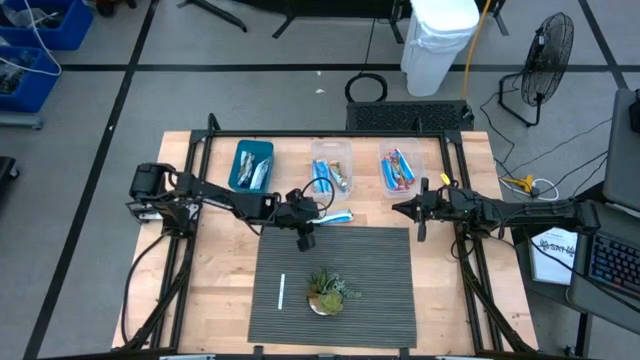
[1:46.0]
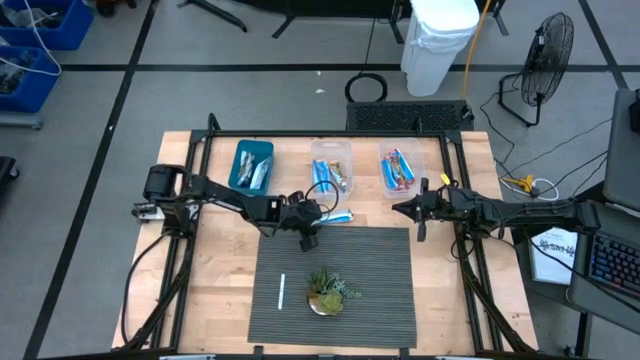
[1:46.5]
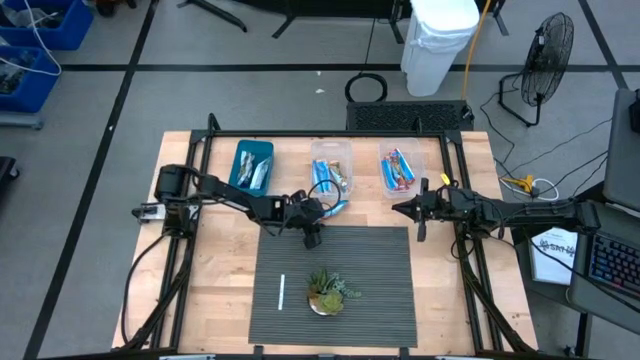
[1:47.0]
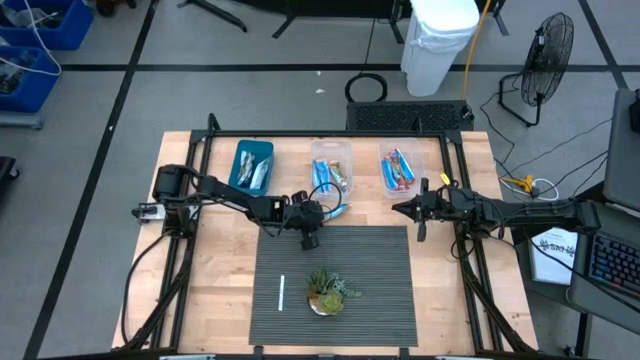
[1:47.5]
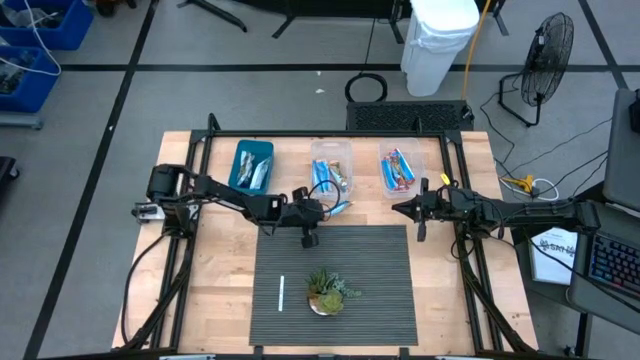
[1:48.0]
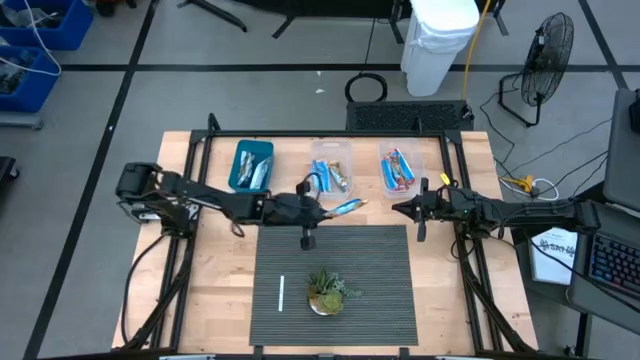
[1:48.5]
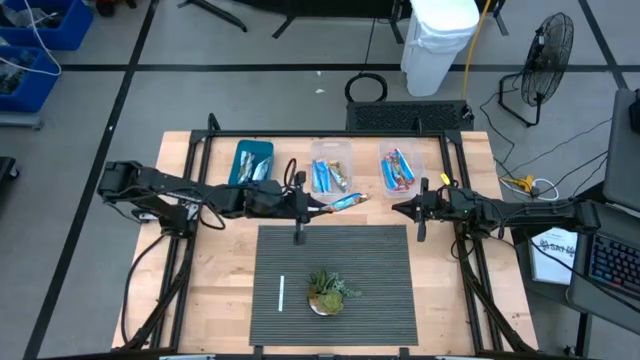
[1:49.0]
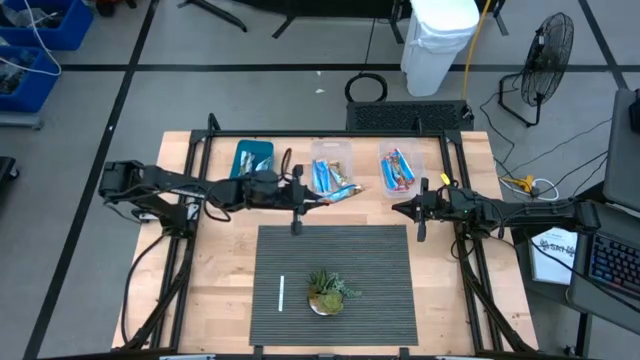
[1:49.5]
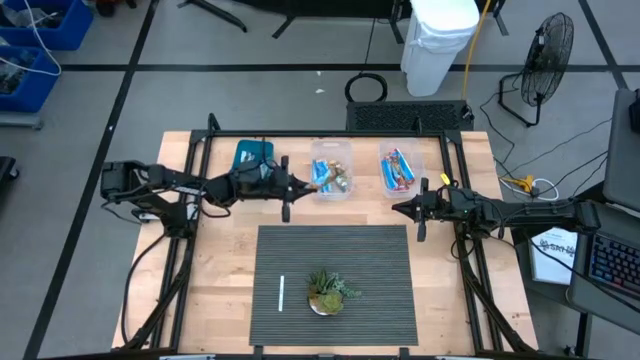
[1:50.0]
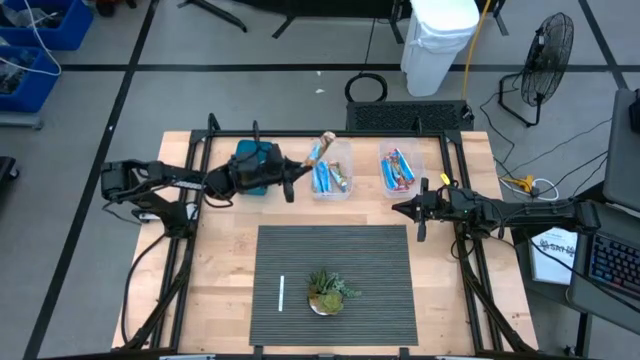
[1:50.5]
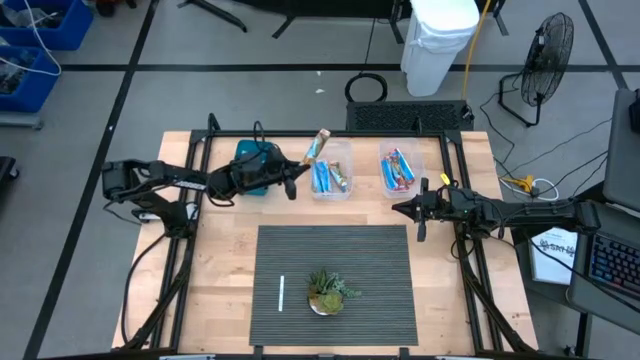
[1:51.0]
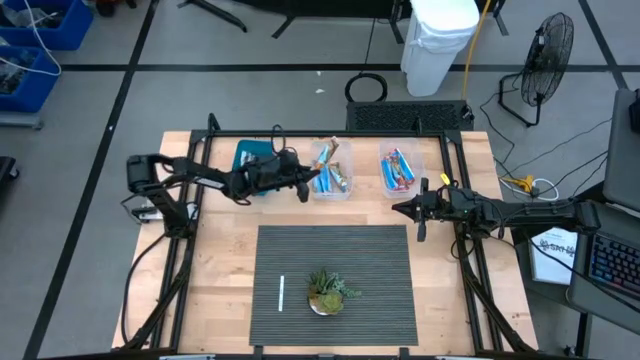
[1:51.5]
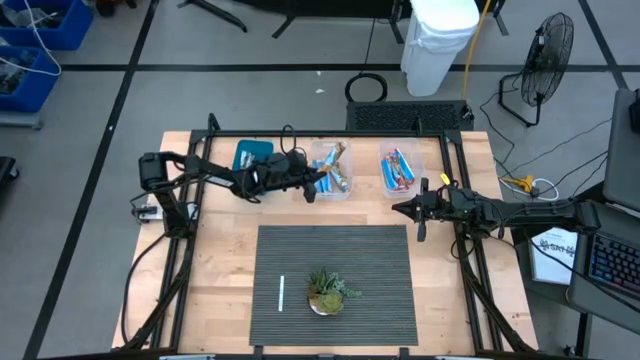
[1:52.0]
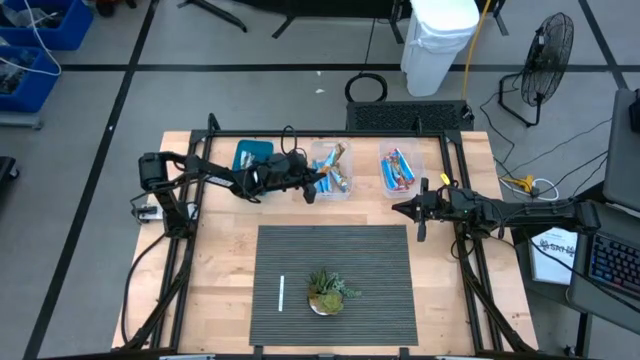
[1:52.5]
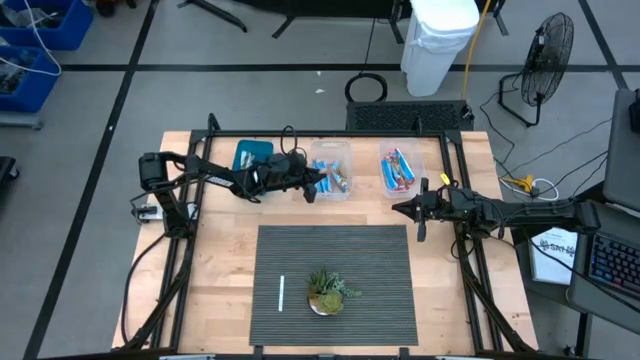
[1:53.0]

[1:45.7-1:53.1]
Task: Pick and place Granola Bars by type
Put the yellow granola bar into the left transparent bin

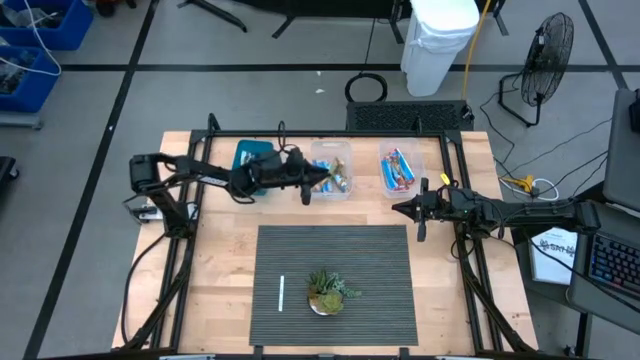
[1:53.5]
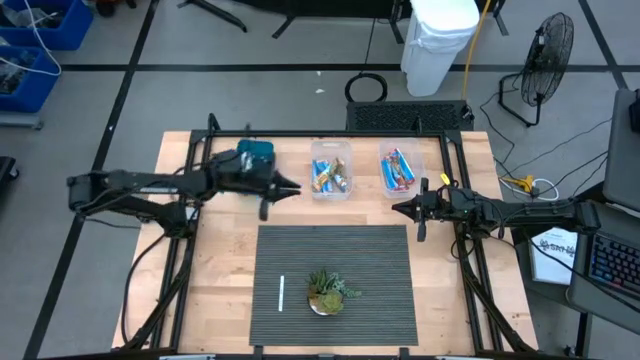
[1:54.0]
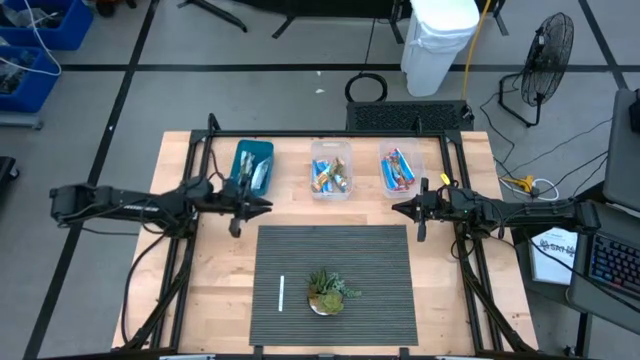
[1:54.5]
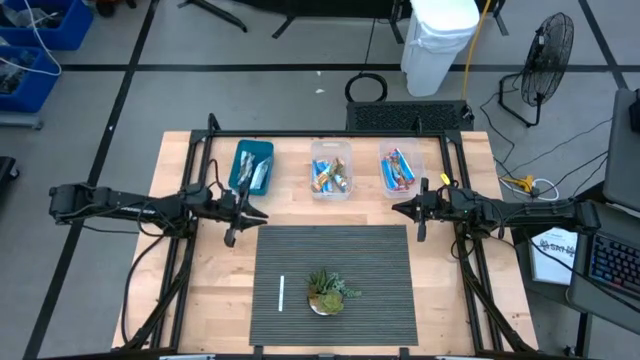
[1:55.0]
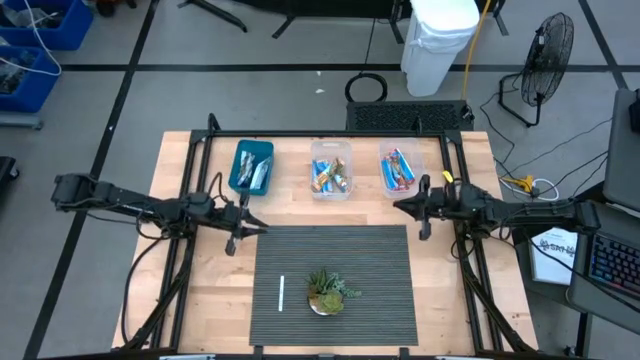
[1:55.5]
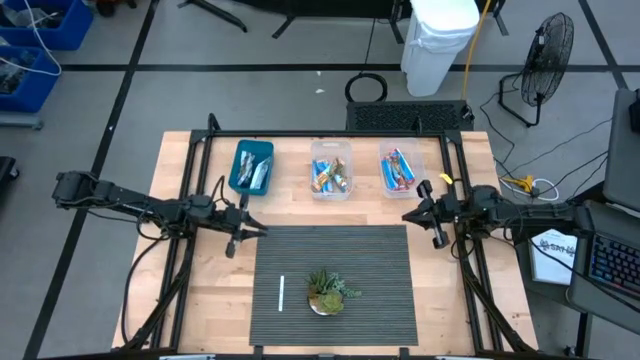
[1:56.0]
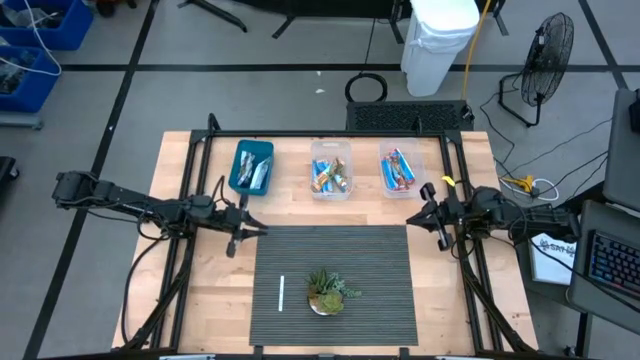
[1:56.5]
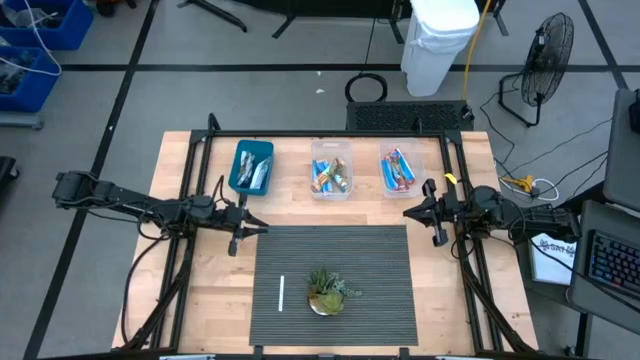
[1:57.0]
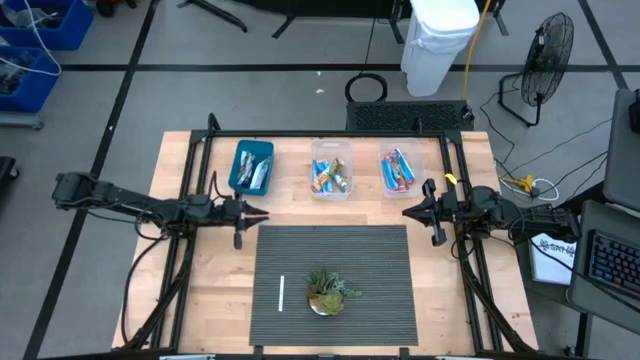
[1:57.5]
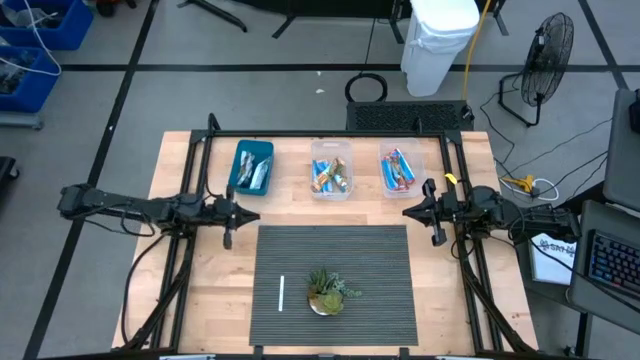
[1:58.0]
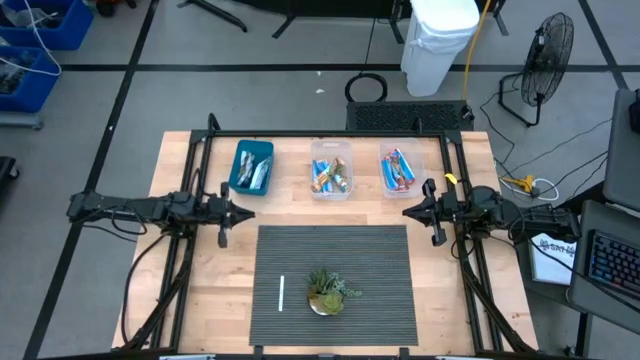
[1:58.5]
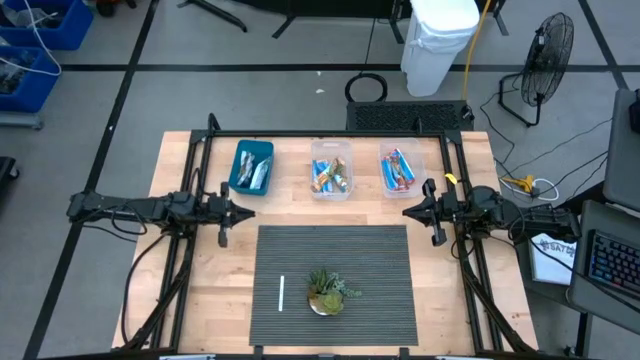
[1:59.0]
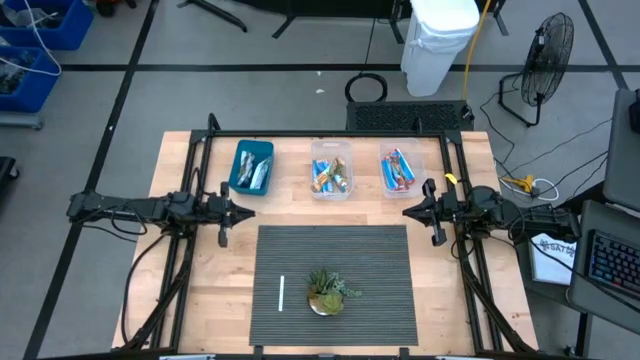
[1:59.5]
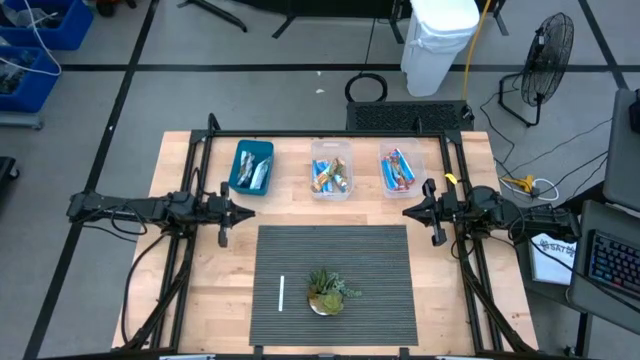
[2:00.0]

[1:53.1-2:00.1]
Return to Home Position

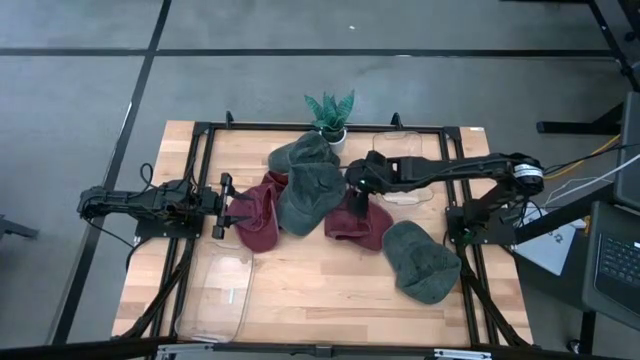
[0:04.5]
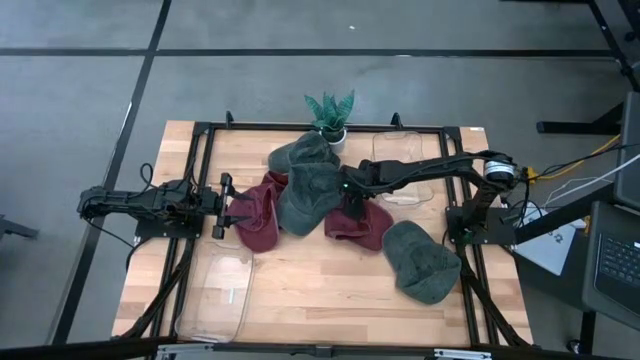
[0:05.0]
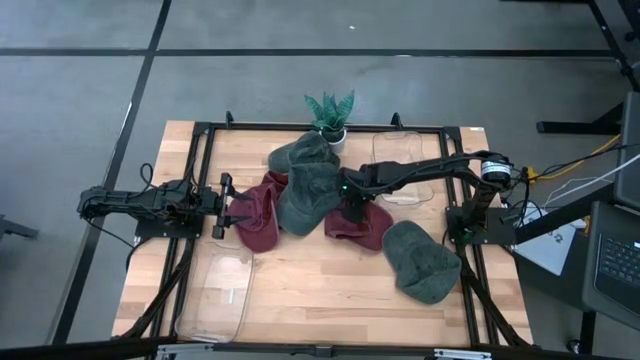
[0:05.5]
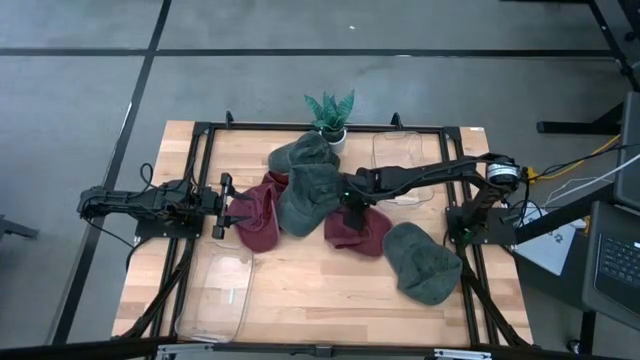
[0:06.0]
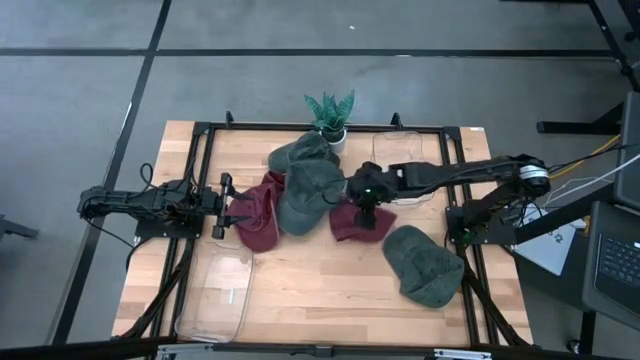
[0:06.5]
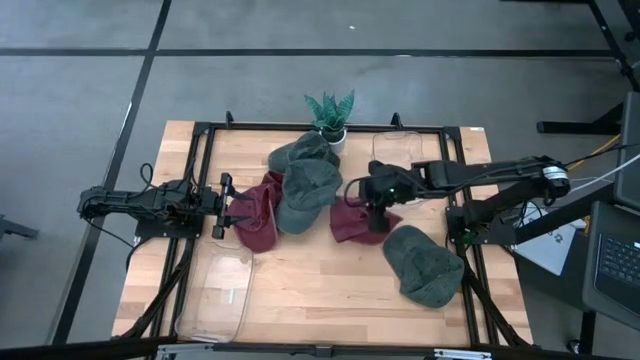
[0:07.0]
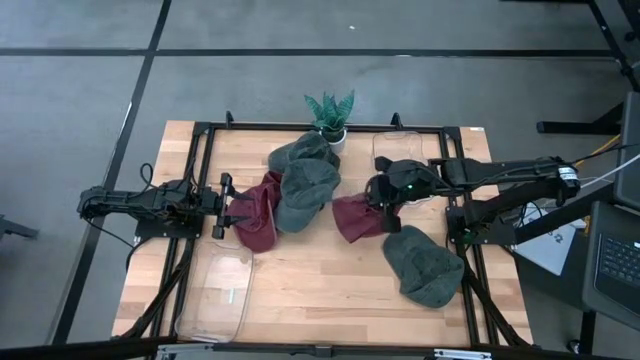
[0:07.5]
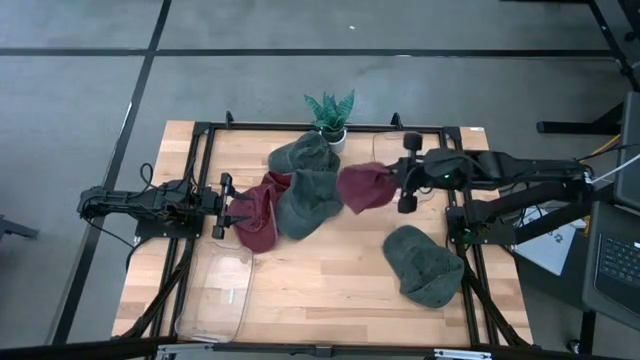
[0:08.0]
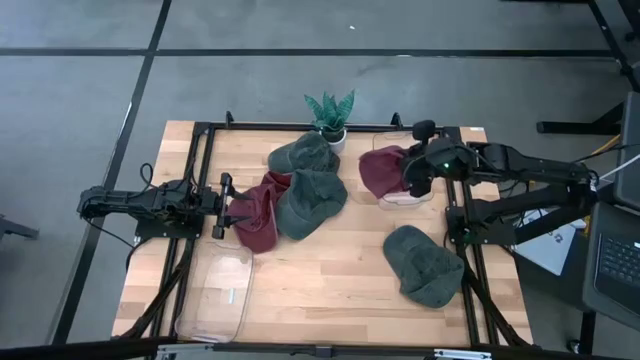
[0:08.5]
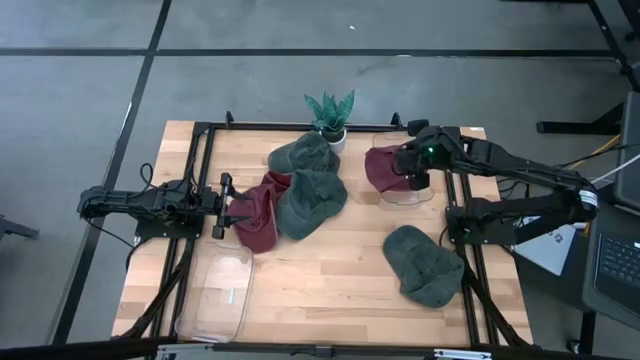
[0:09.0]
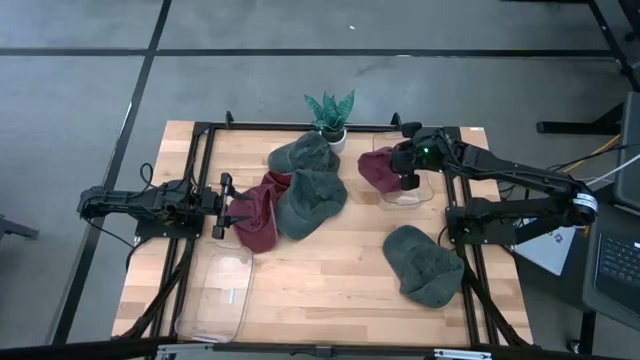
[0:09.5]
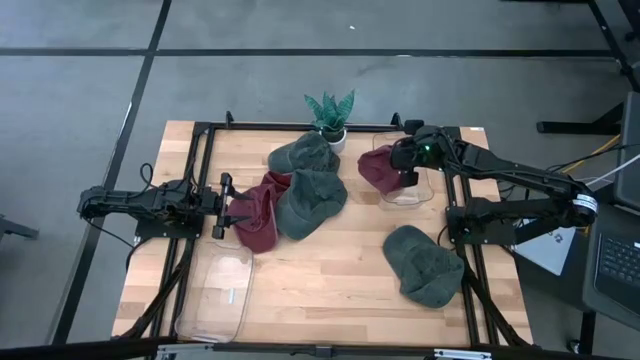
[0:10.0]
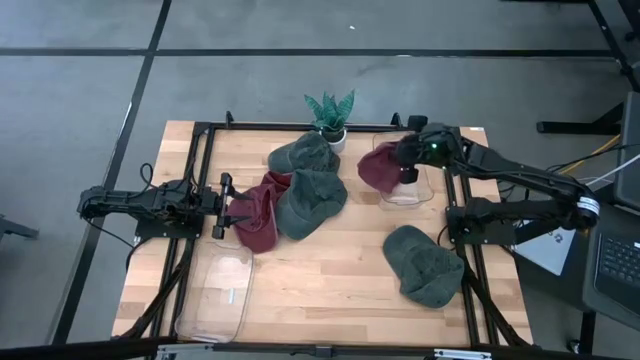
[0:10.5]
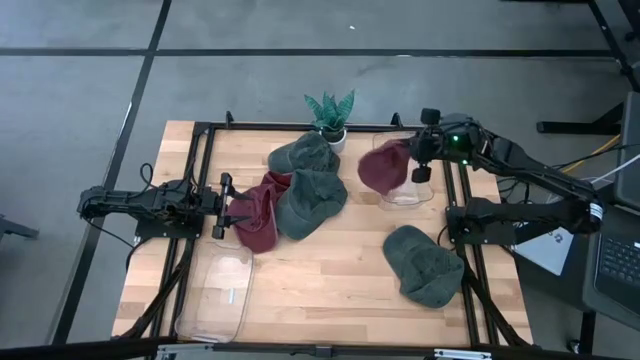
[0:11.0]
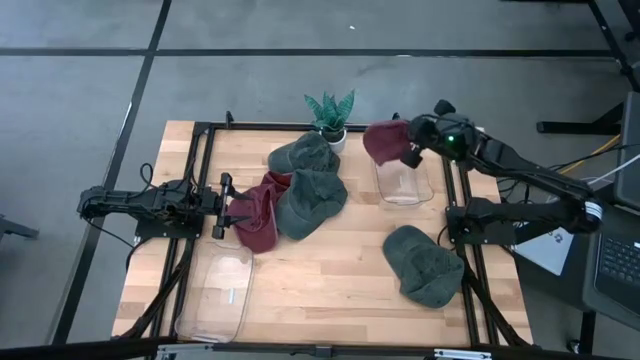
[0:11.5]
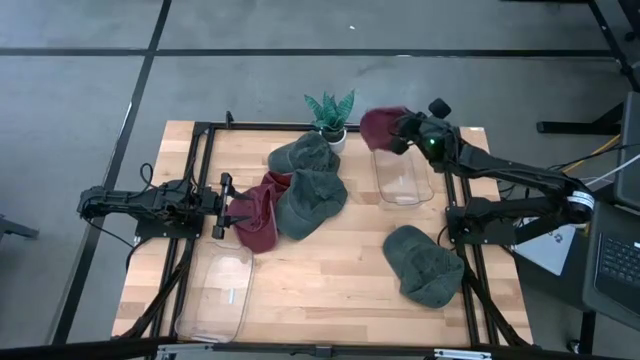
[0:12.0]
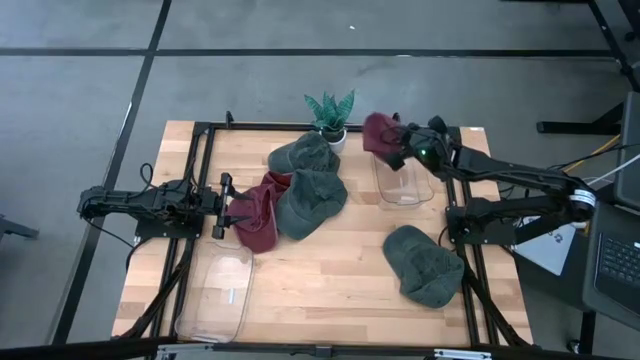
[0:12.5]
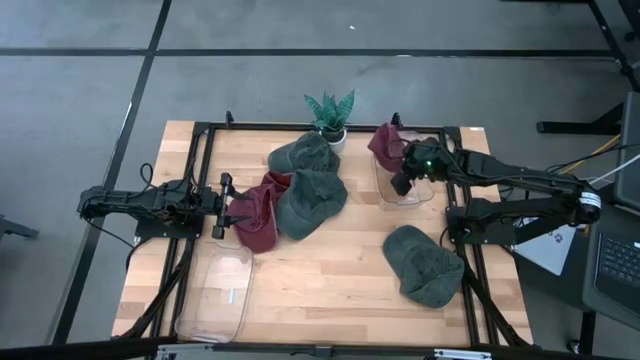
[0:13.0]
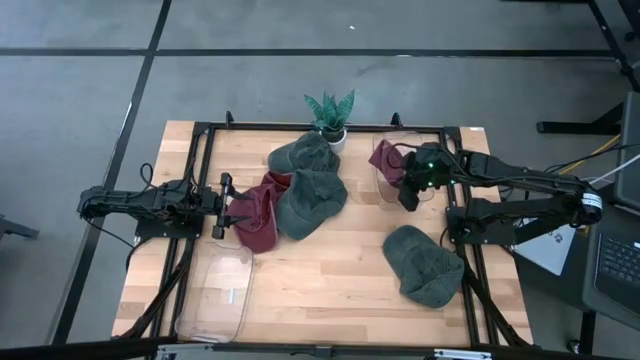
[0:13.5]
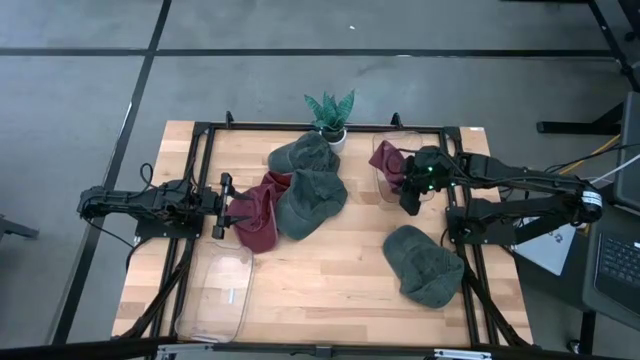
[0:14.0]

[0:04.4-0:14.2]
Task: Pick & Place hat
Put the bottom right red cap into the top transparent bin
